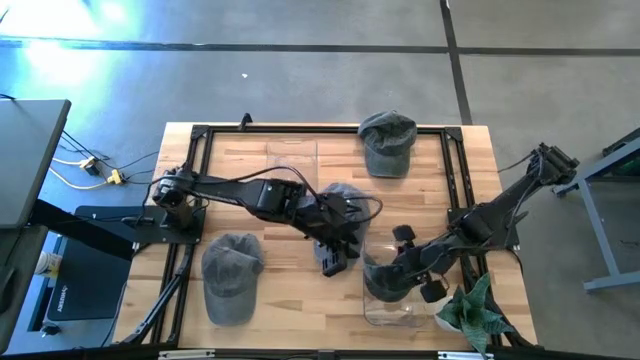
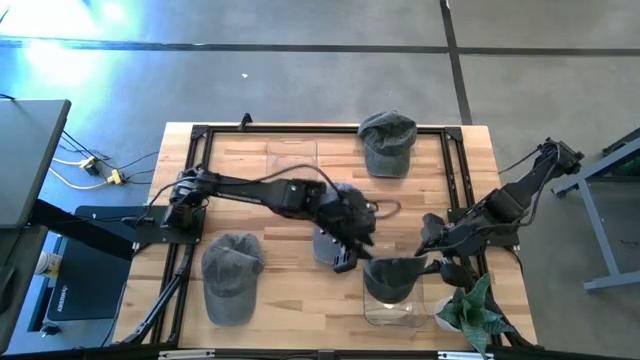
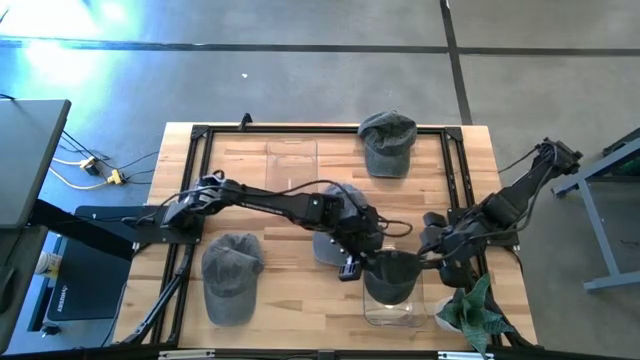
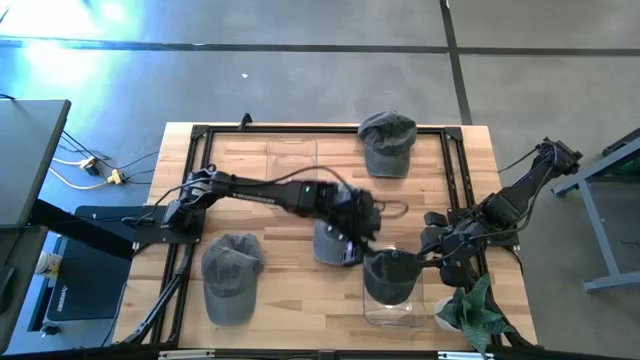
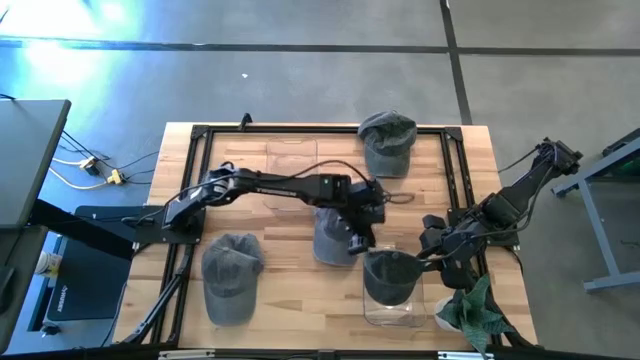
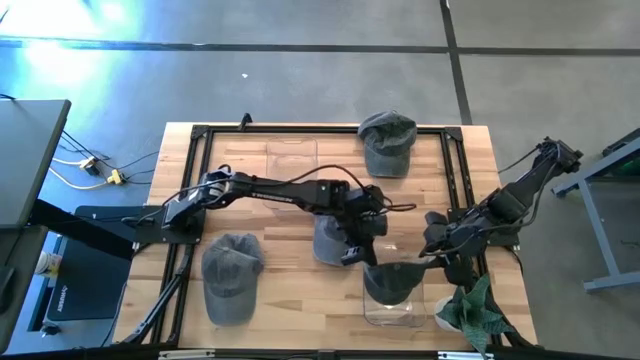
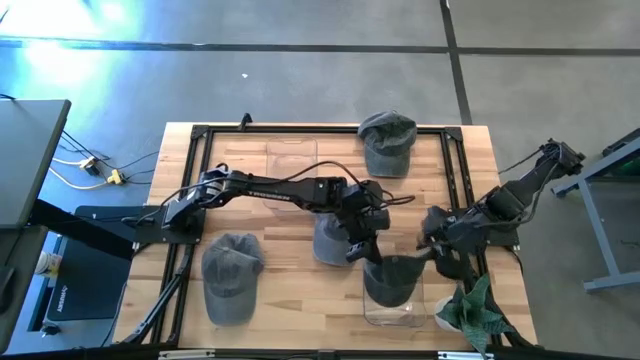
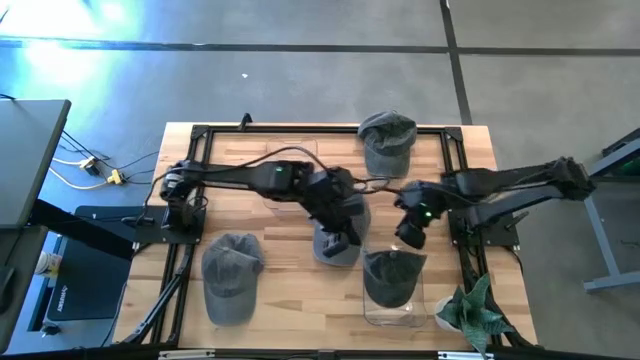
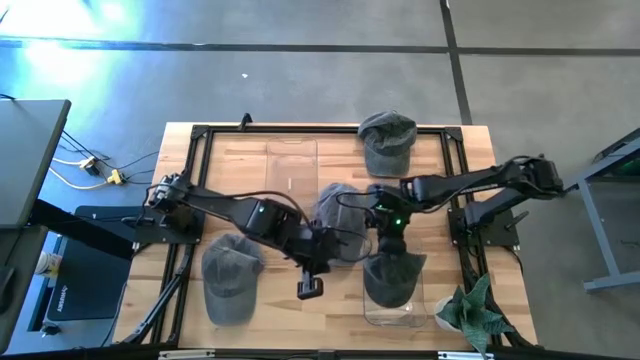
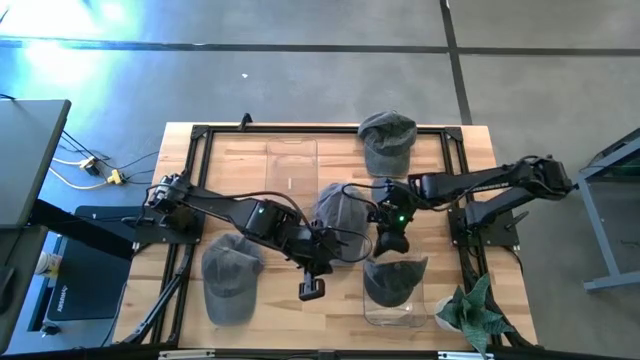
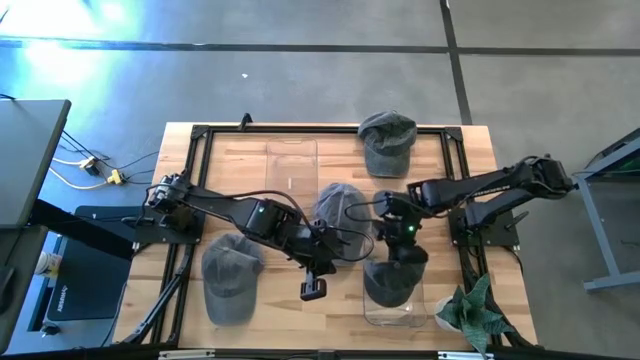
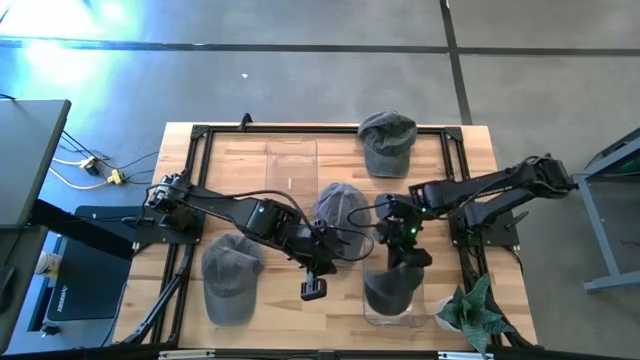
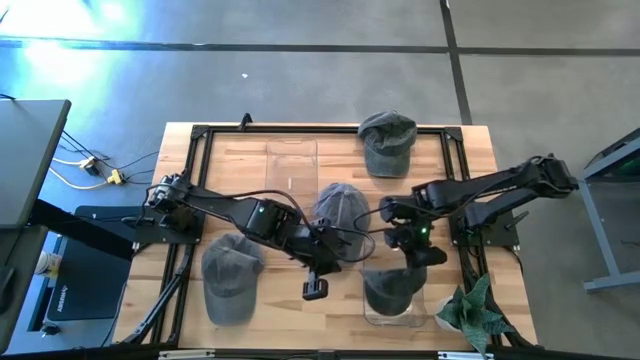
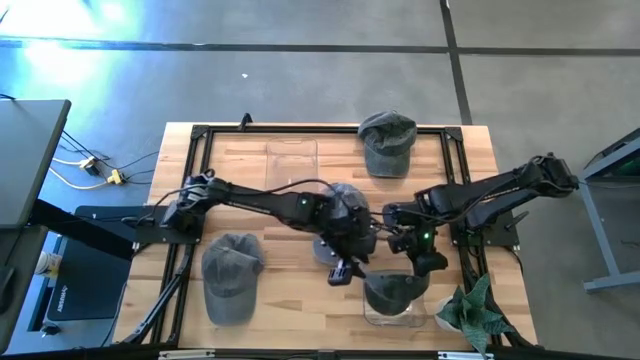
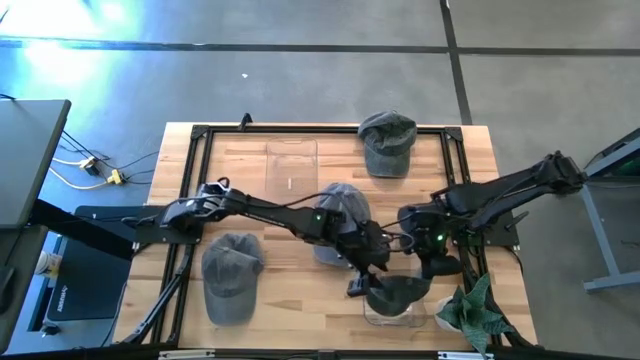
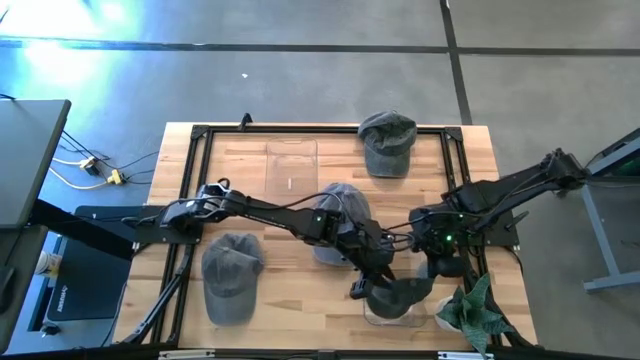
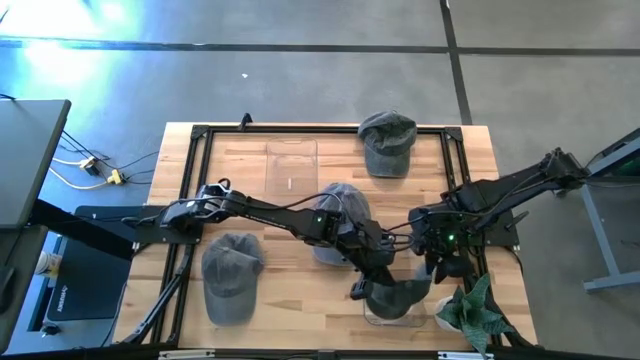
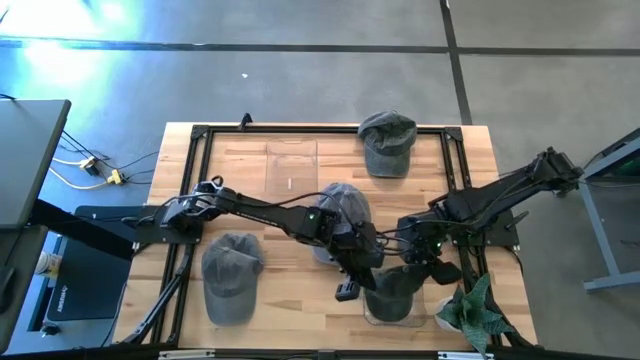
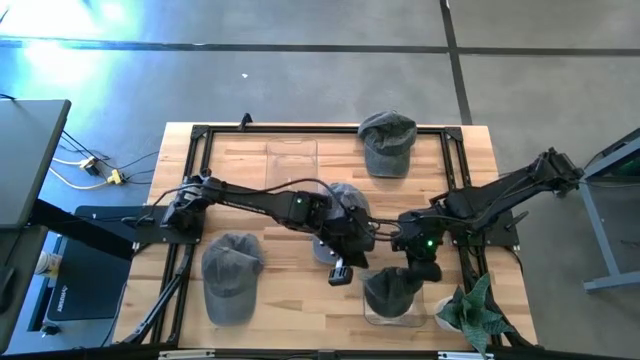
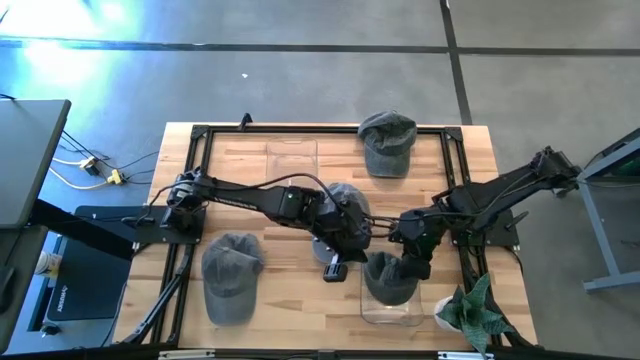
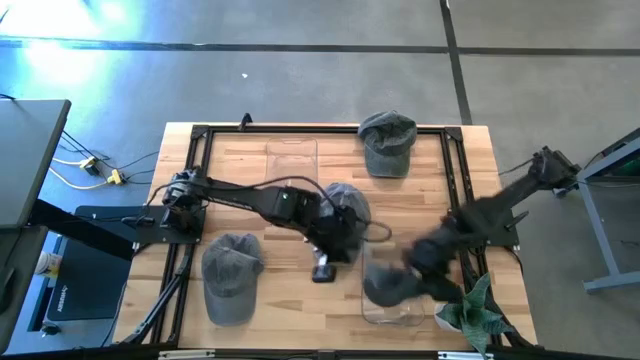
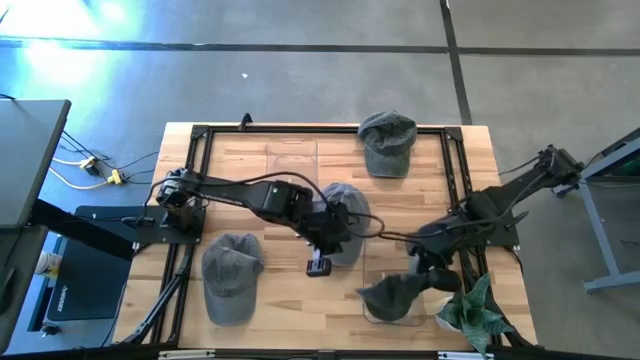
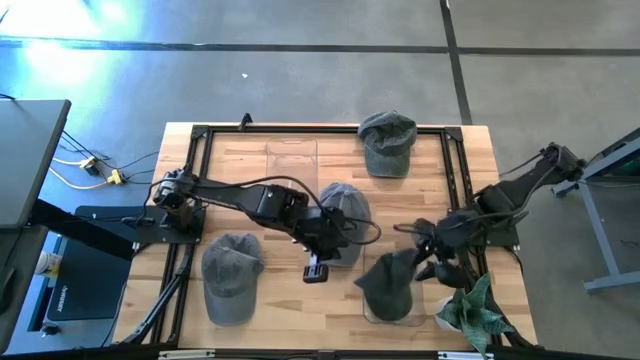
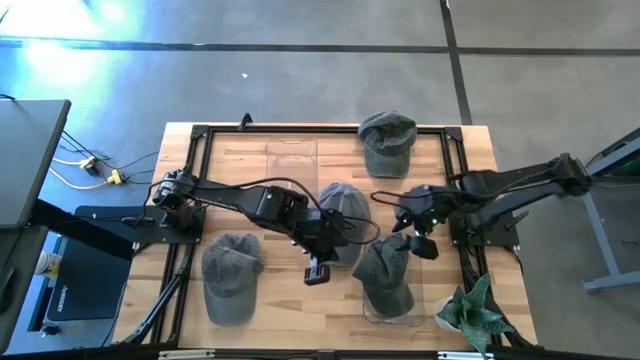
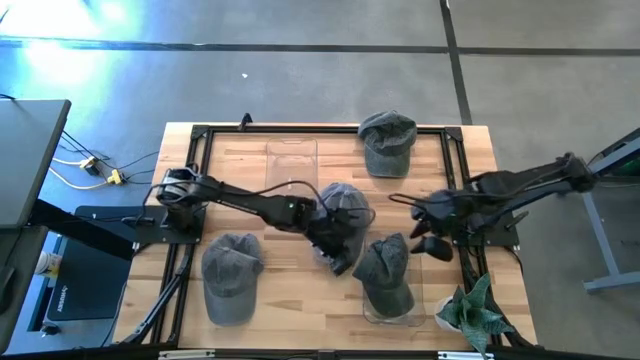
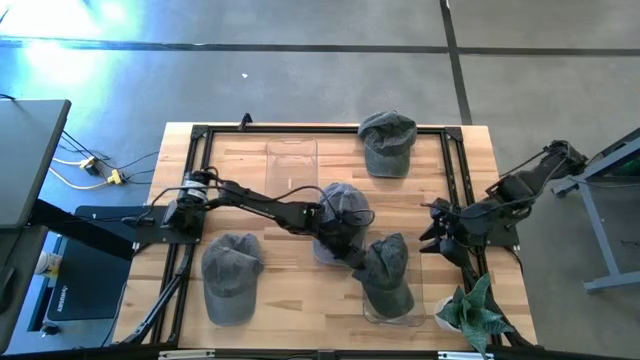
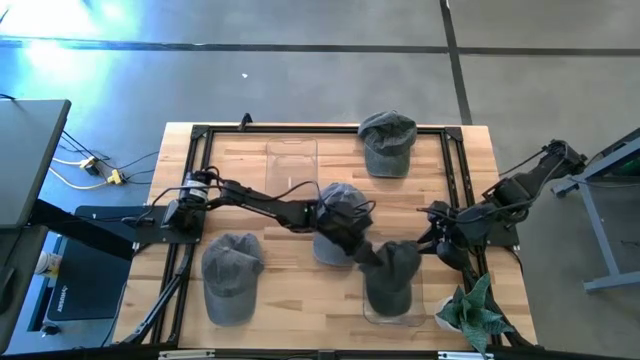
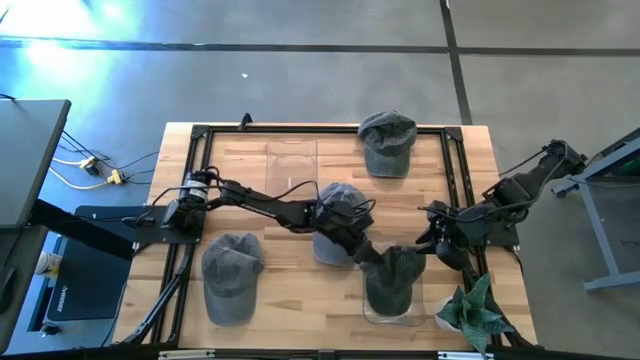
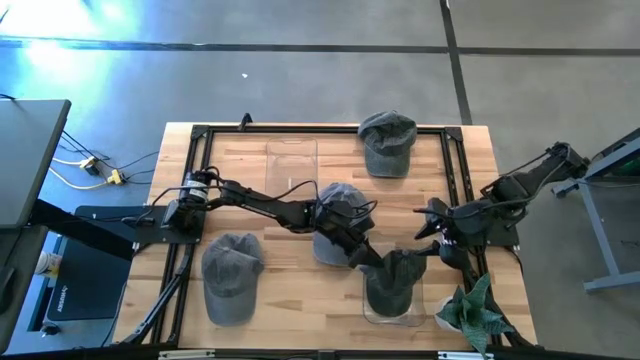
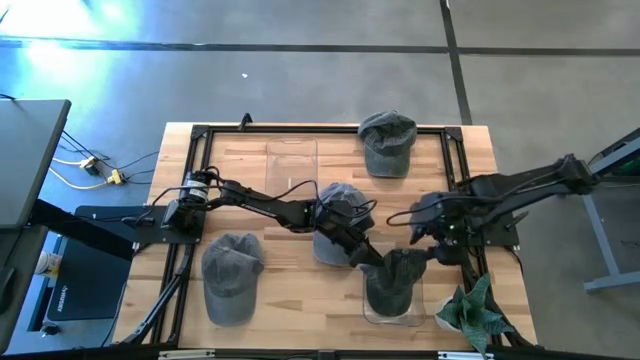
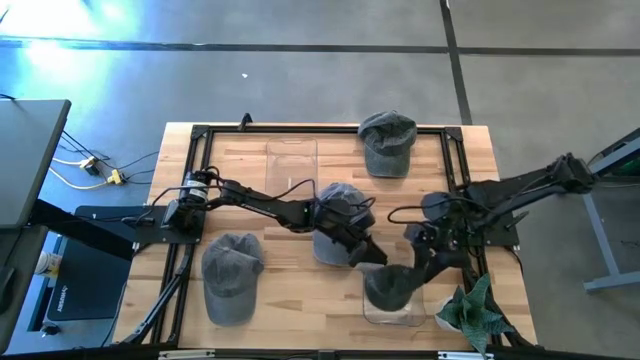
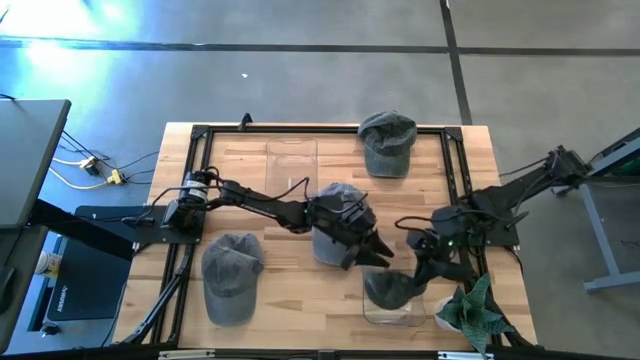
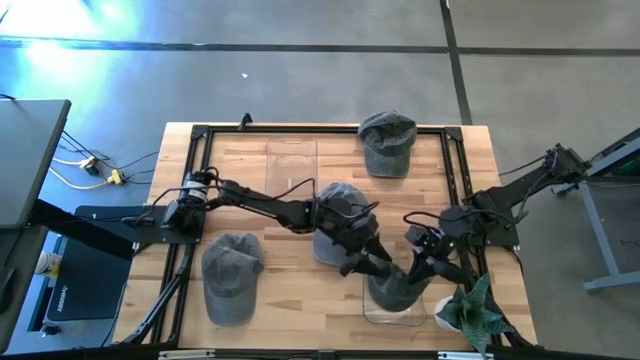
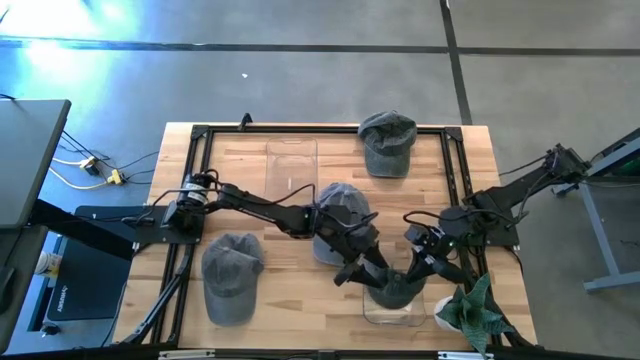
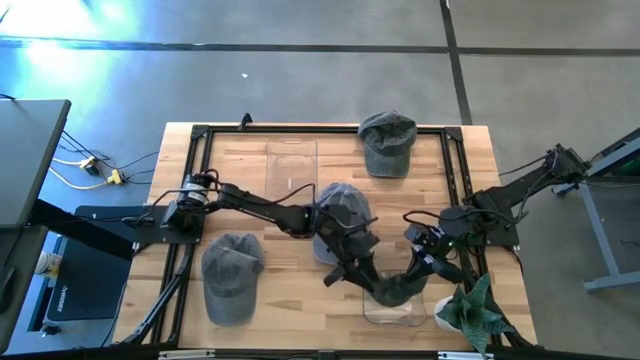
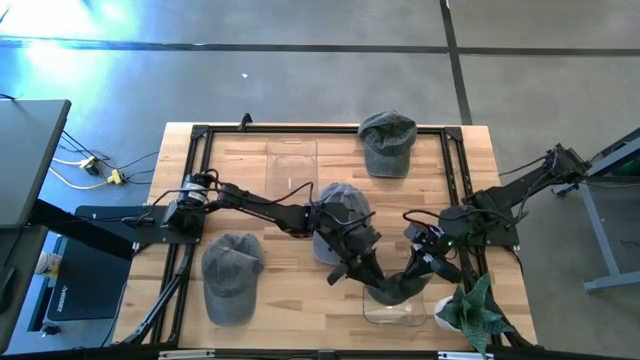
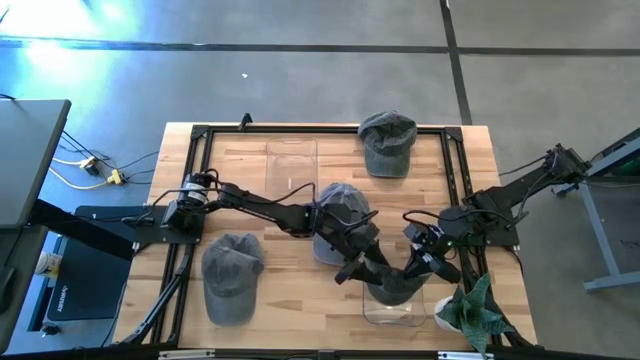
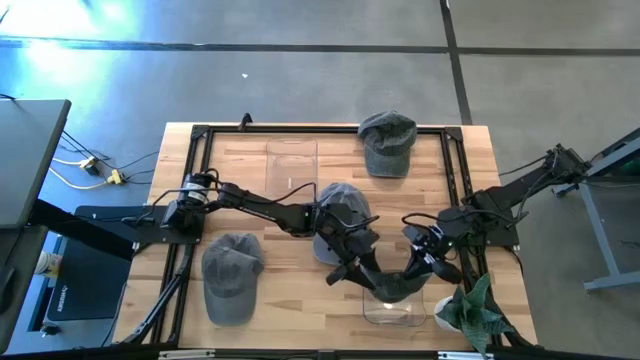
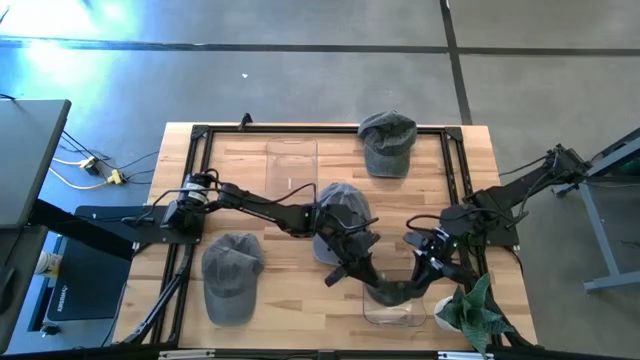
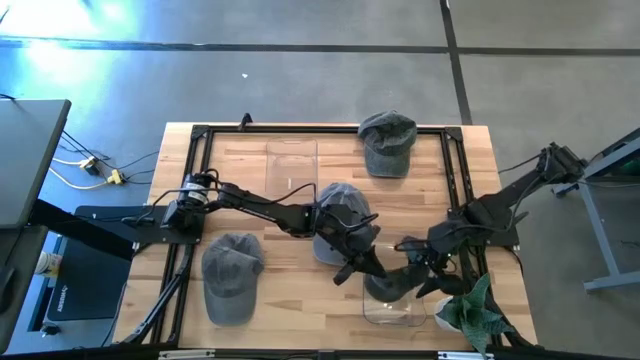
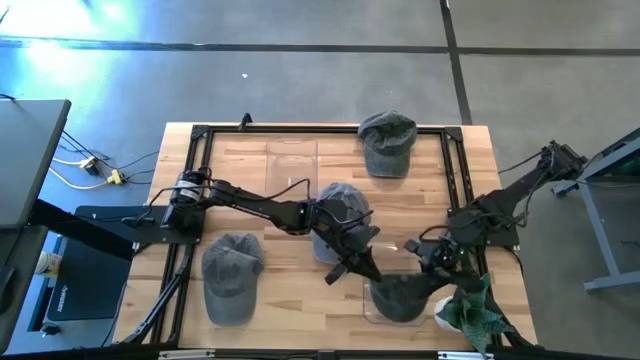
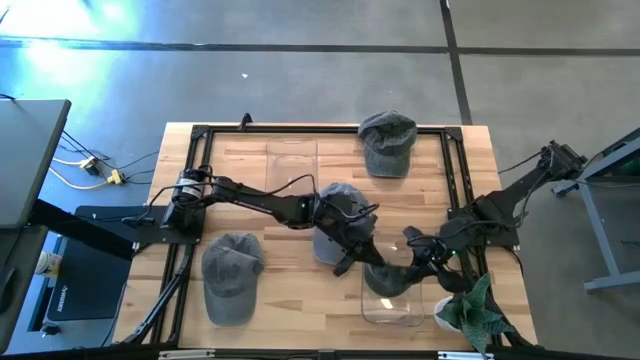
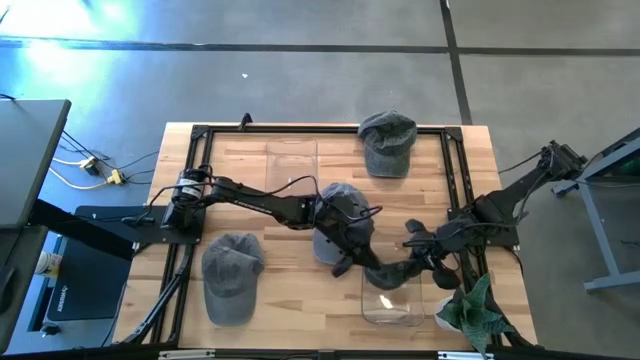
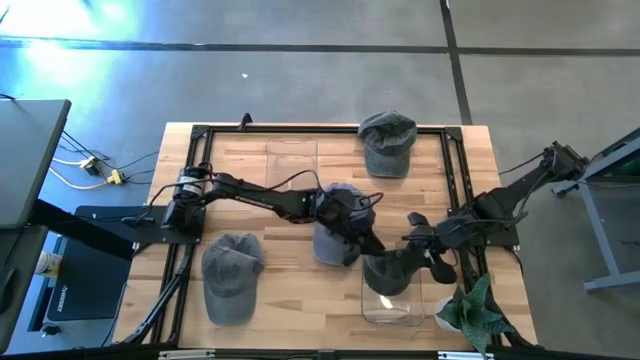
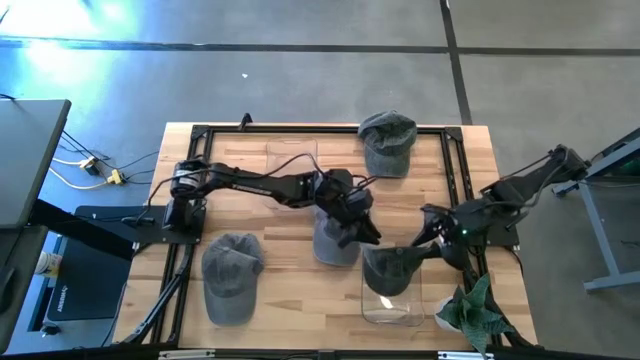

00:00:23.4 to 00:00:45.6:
Task: Pick & Place hat
Put the left dark gray cap into the bottom transparent bin
